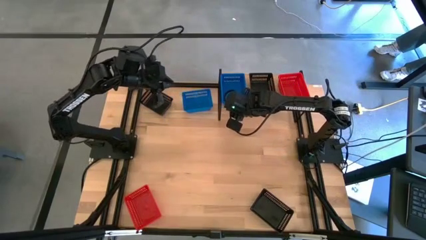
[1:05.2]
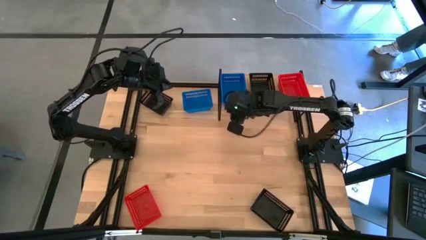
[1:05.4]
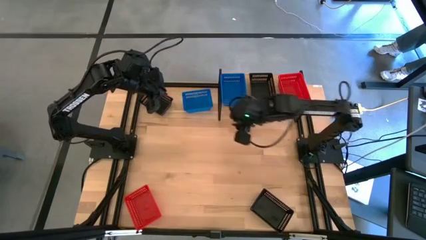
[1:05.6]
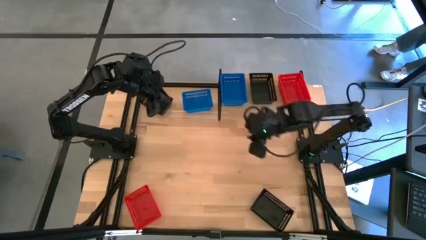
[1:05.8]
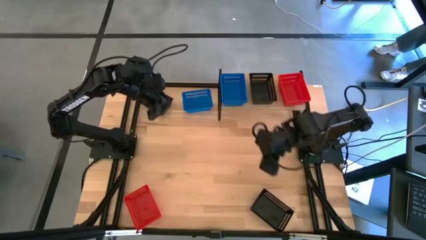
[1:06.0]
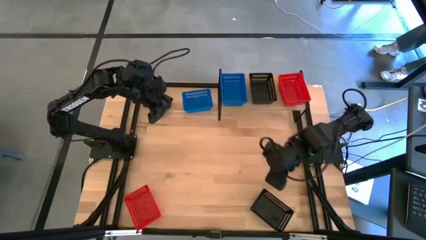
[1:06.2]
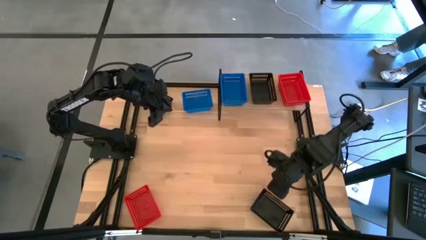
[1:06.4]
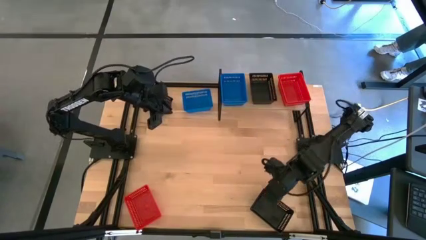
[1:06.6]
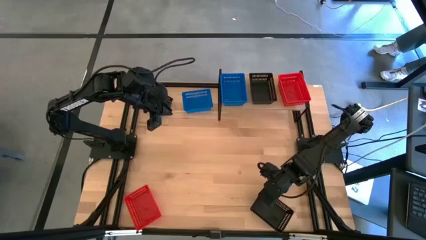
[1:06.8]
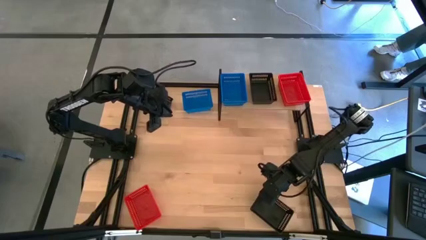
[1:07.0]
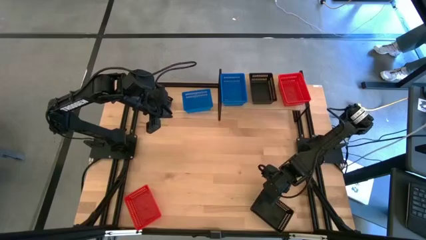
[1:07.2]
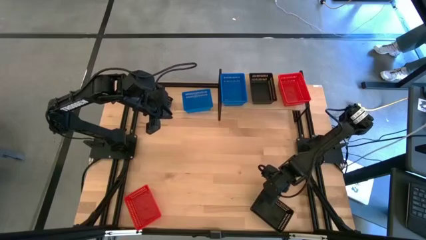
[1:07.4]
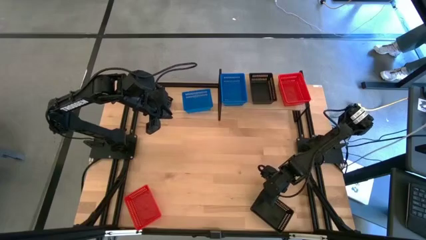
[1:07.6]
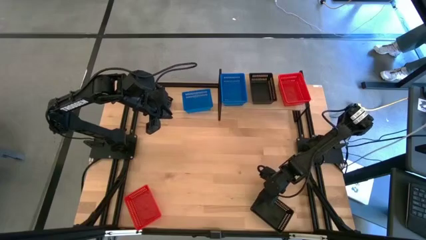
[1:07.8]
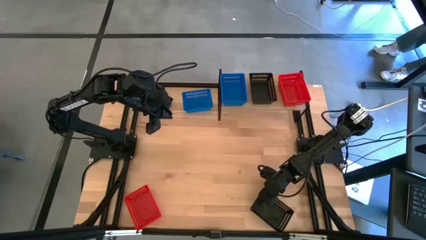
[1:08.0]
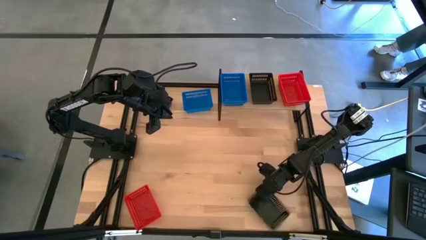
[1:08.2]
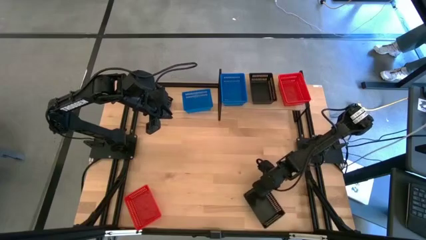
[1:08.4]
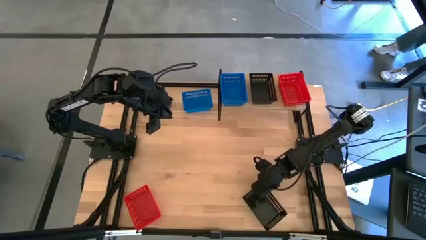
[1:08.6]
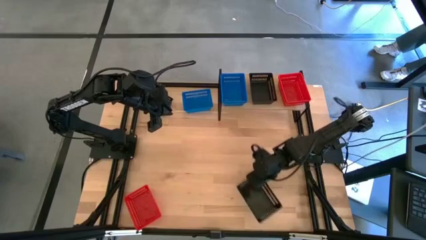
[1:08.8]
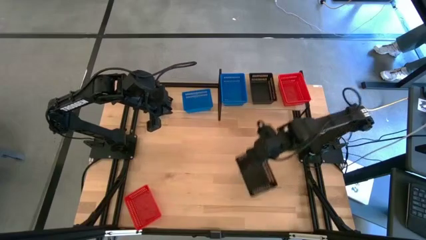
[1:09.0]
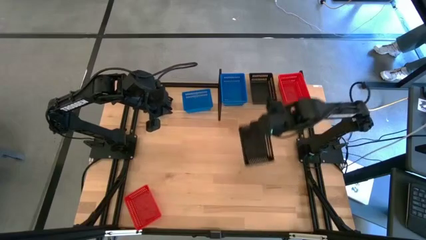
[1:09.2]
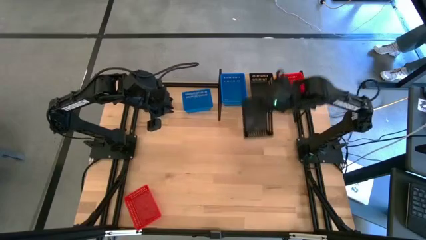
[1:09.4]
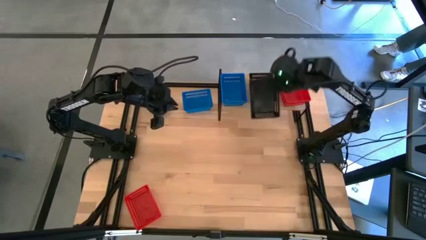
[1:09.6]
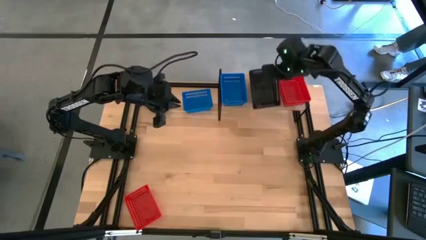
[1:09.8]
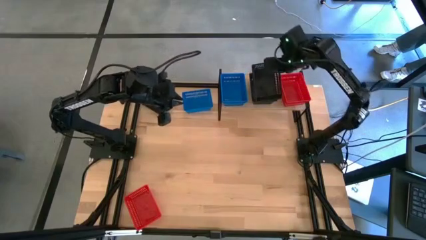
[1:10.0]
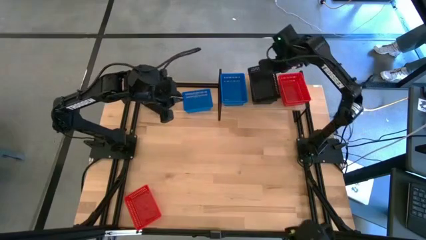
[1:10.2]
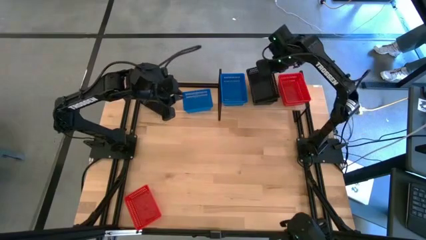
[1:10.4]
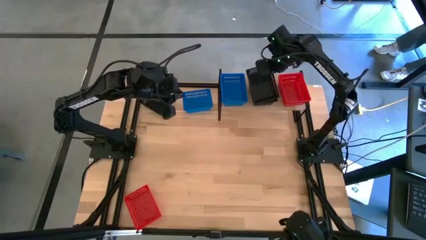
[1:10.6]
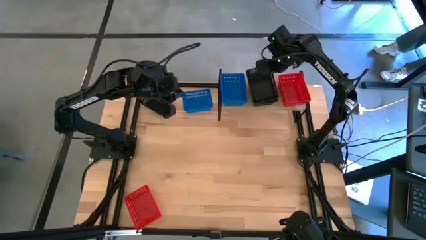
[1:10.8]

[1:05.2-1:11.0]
Task: Stack baskets on shelf by color
Stack the bottom black bin on the black bin on the shelf

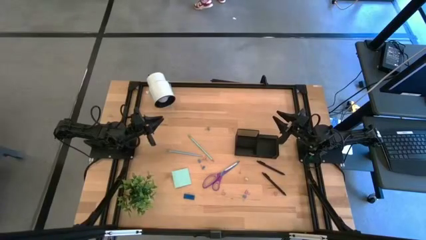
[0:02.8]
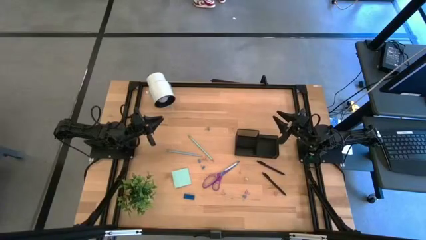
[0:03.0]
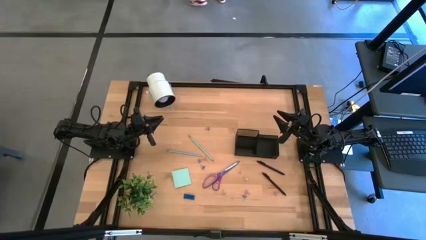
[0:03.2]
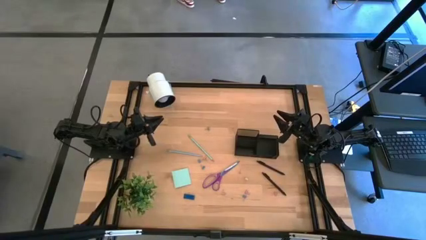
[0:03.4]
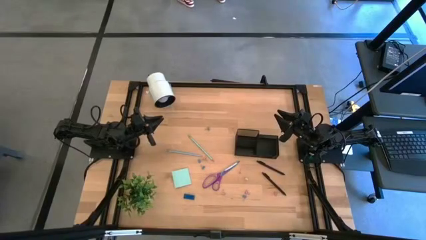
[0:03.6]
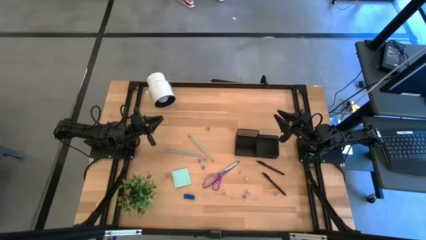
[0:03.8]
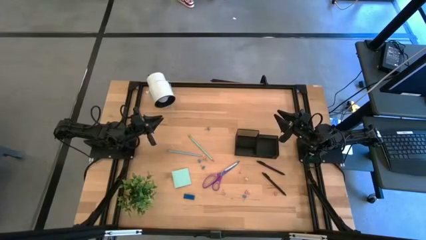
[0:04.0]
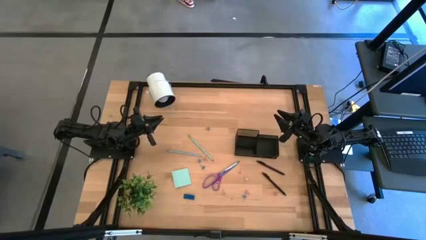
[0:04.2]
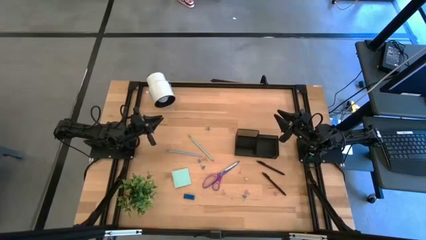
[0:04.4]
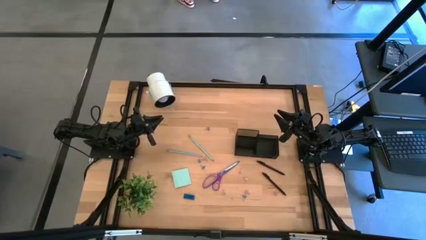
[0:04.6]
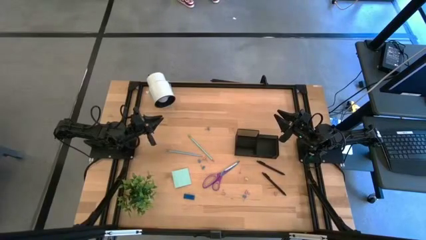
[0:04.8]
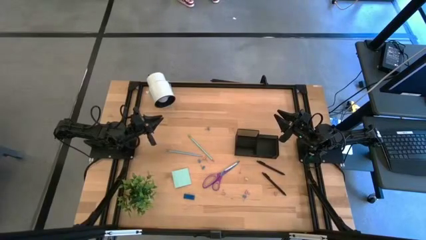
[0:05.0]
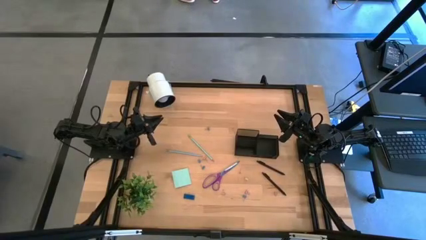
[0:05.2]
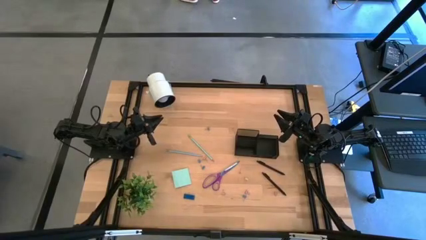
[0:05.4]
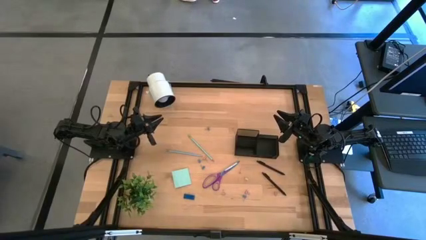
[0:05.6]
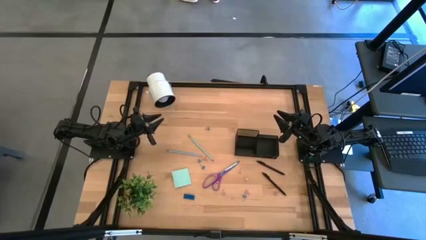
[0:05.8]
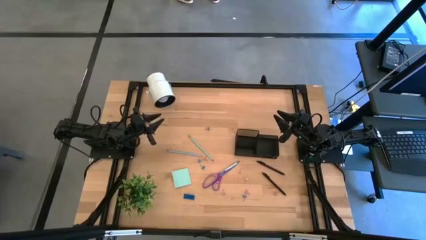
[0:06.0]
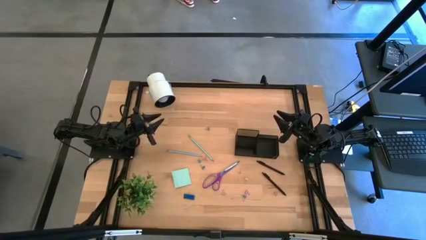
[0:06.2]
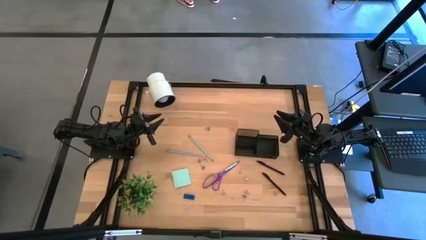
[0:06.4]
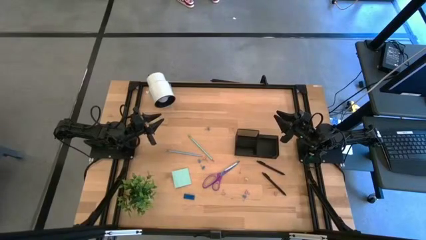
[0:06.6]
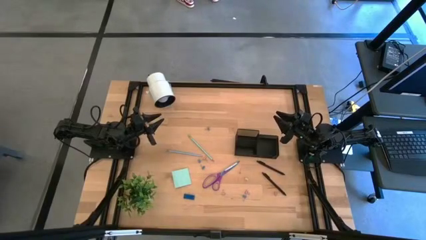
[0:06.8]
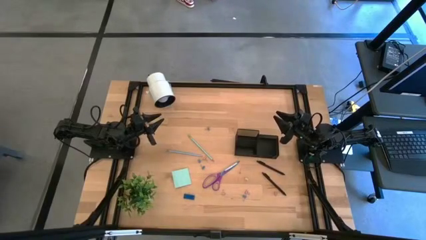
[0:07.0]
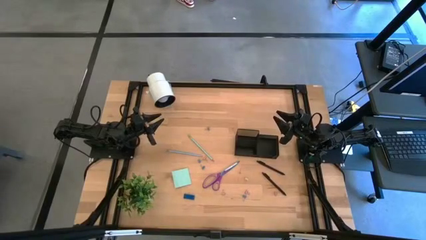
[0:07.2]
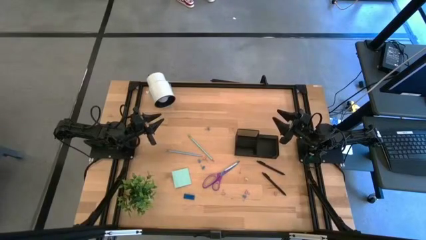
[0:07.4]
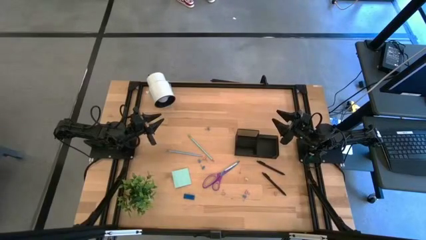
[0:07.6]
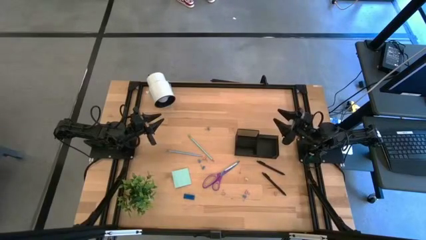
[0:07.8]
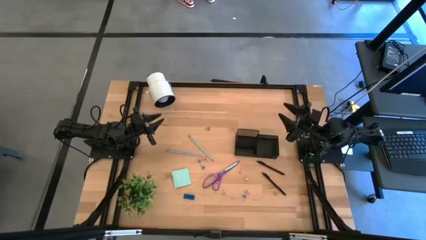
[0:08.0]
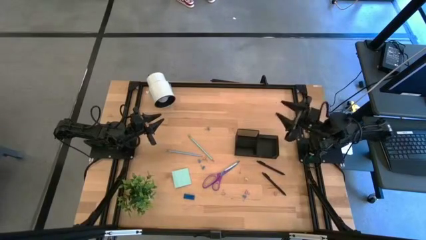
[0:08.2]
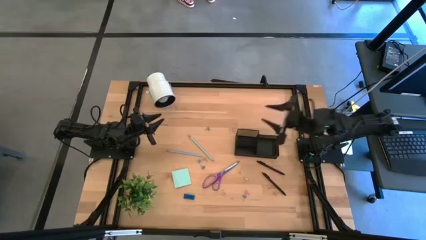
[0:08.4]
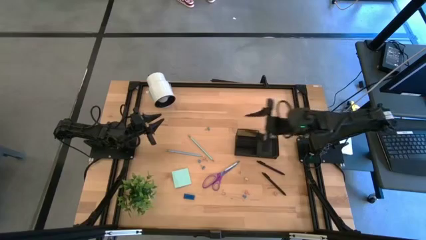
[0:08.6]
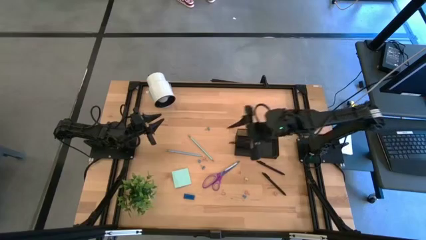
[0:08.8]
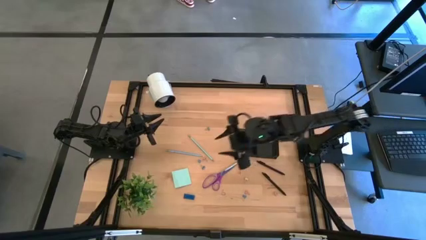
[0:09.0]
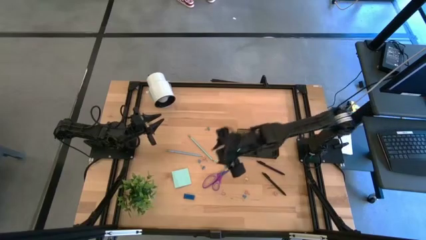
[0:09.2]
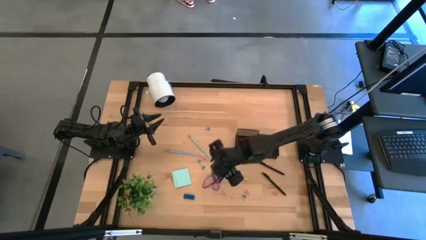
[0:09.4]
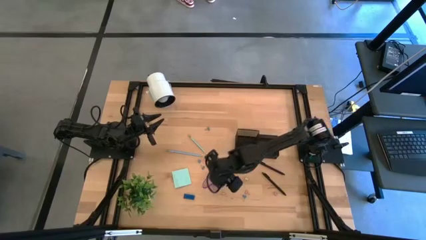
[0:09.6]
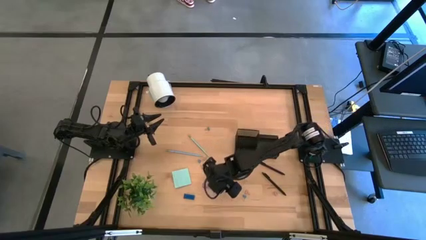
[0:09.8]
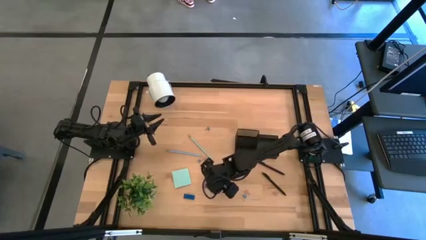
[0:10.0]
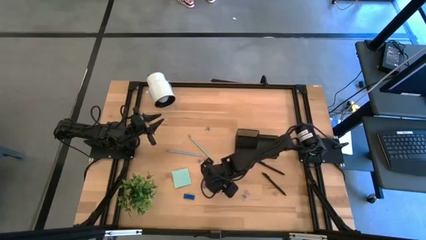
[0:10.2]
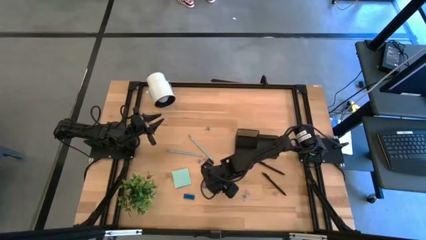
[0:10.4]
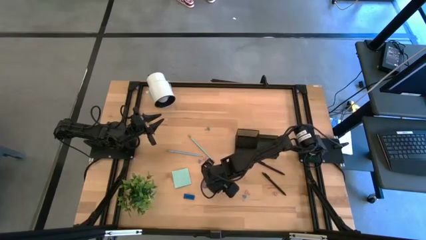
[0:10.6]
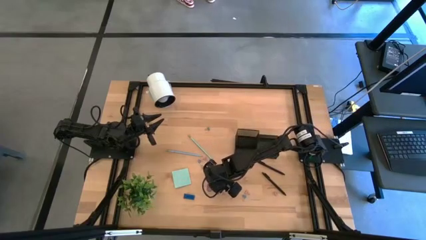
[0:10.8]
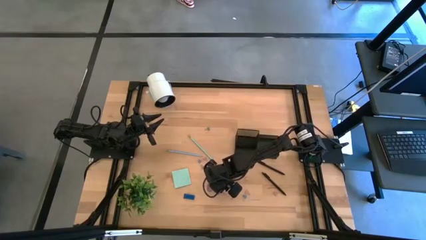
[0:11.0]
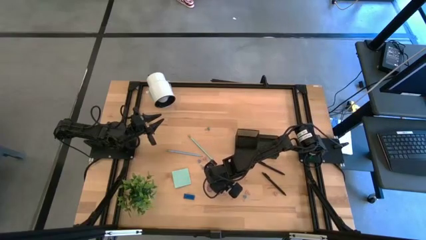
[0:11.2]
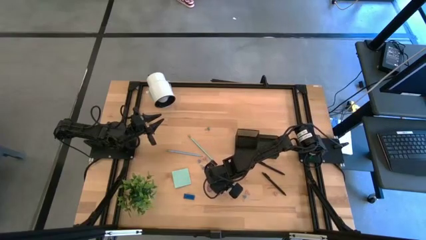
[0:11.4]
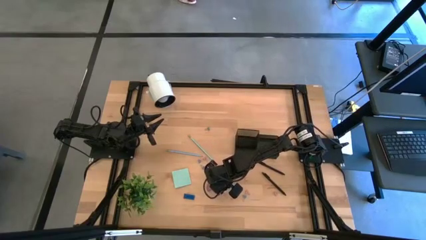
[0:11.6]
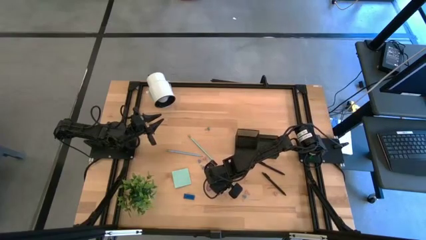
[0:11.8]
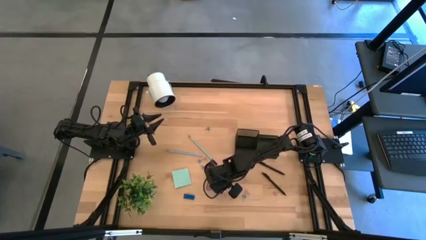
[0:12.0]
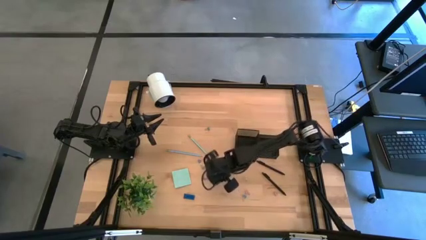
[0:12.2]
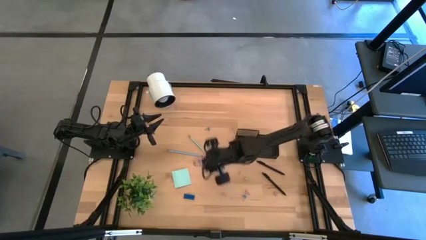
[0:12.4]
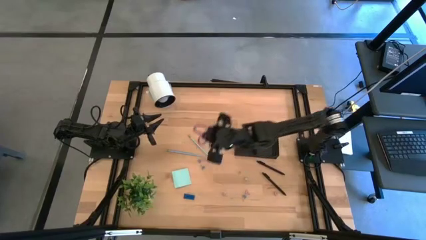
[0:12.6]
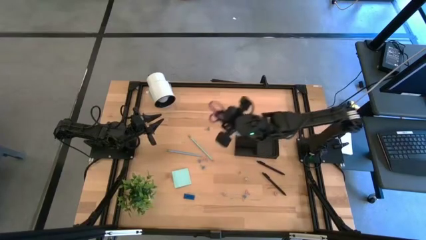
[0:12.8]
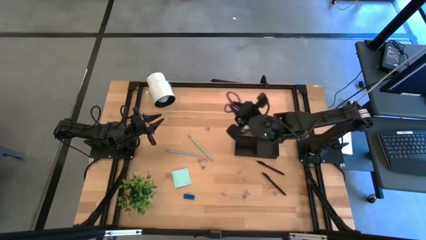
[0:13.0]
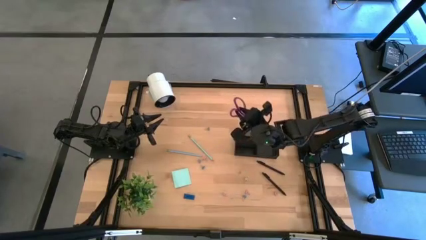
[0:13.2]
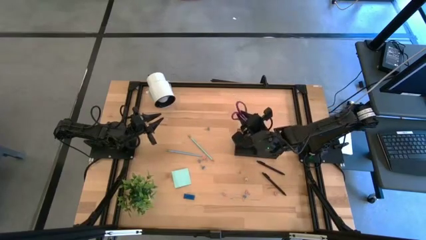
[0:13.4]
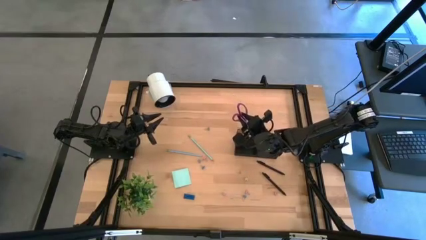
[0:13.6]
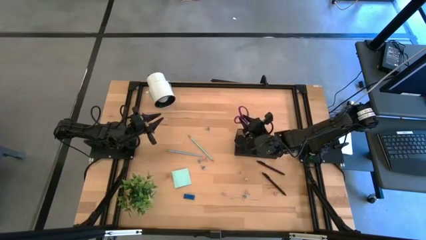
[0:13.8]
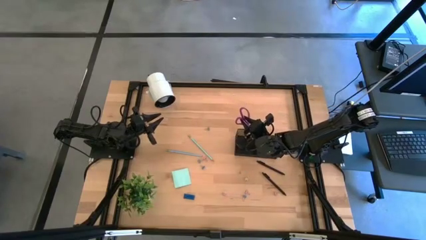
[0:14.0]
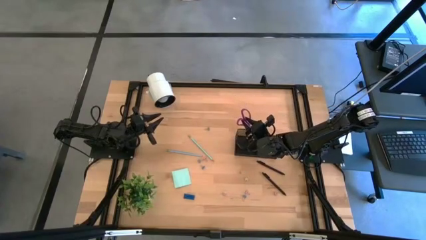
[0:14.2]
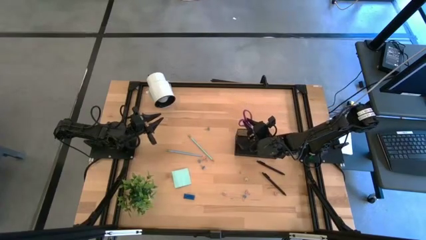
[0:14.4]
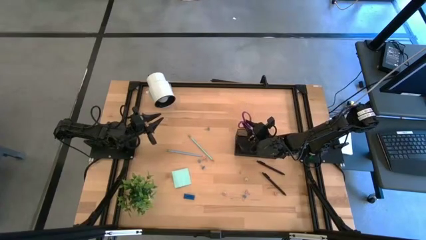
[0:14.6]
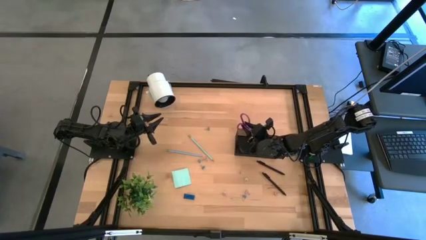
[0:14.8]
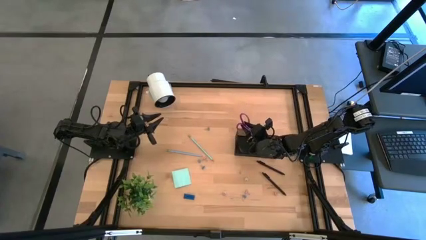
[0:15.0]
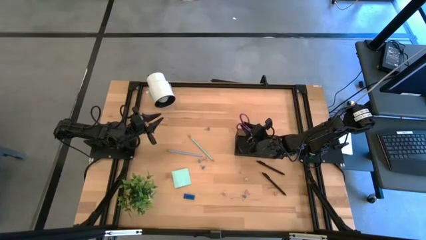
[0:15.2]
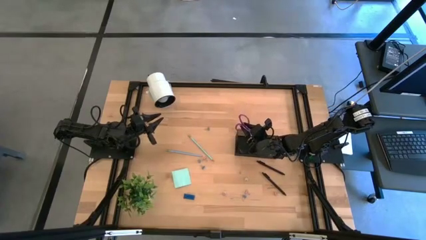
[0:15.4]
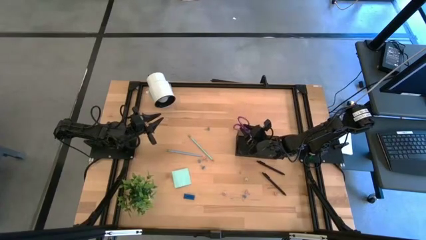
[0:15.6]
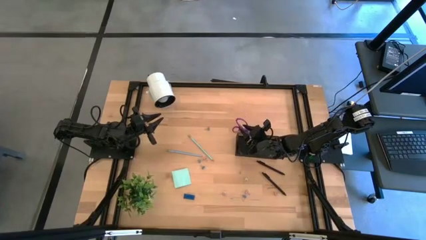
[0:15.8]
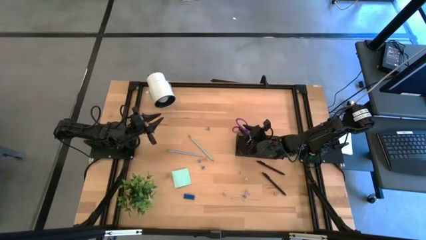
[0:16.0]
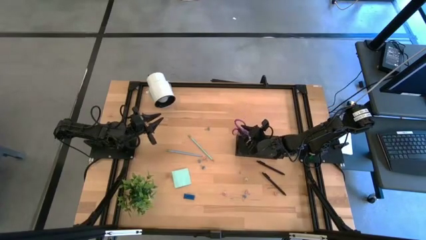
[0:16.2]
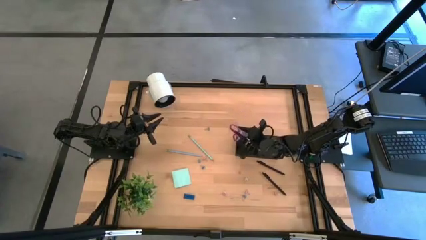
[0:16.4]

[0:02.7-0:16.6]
Task: Pick and place office supplies into organizer
Put the purple scissors into the black desk organizer
